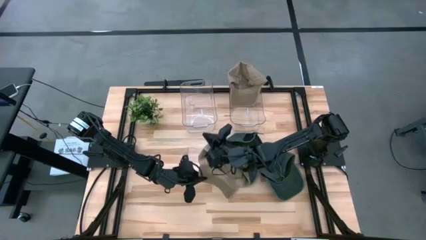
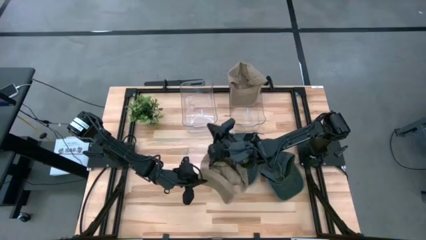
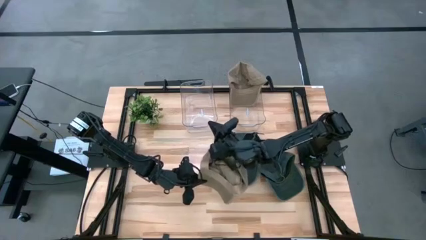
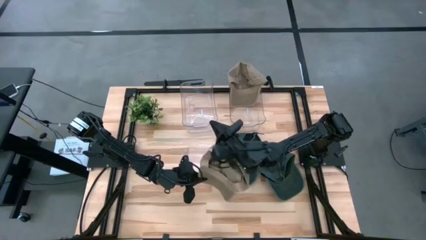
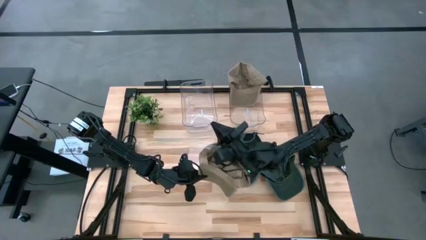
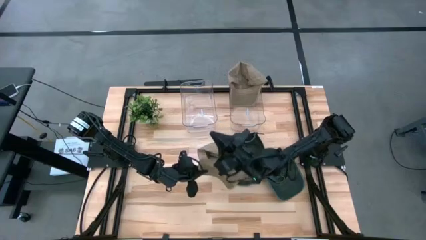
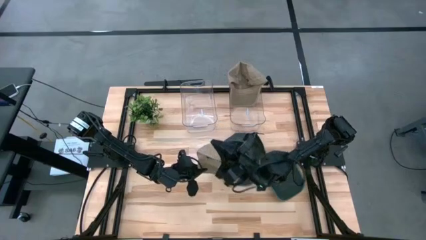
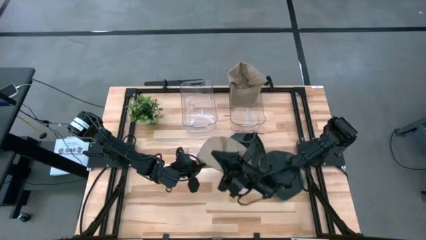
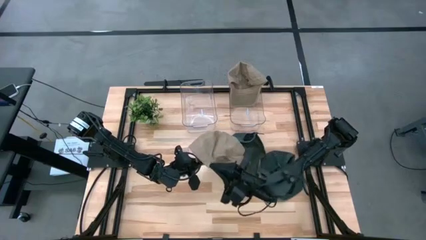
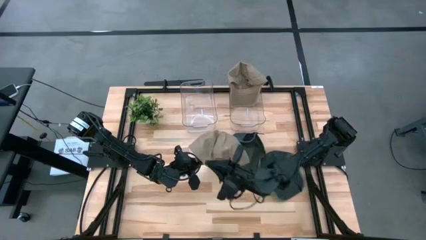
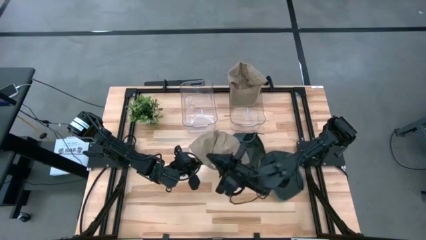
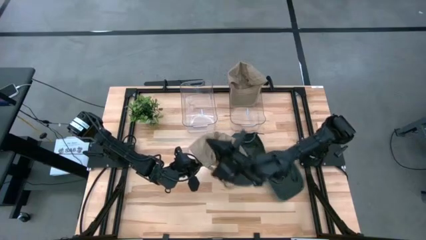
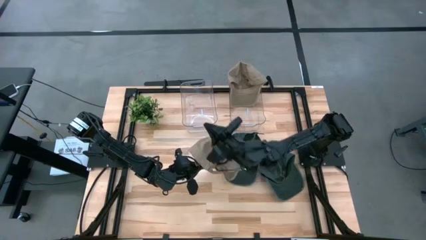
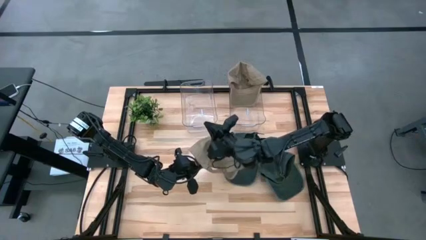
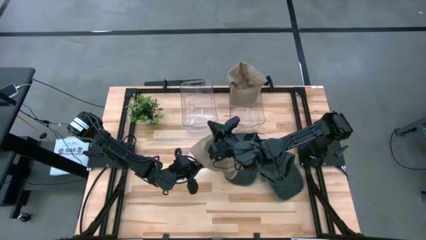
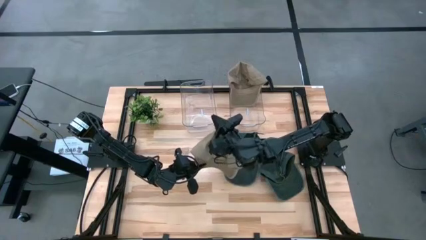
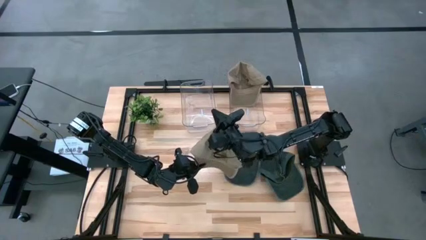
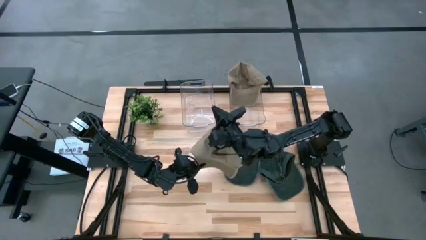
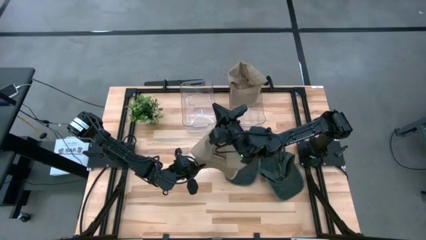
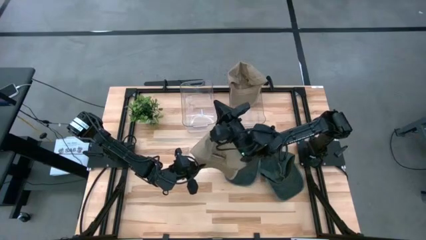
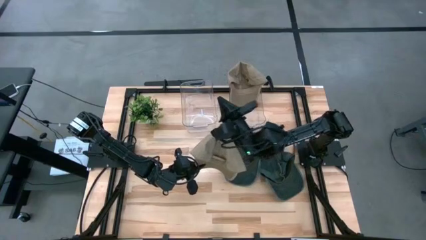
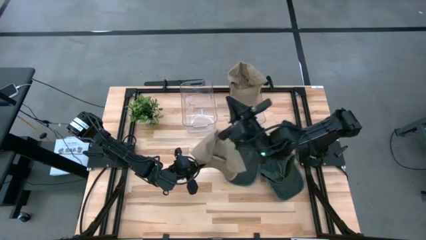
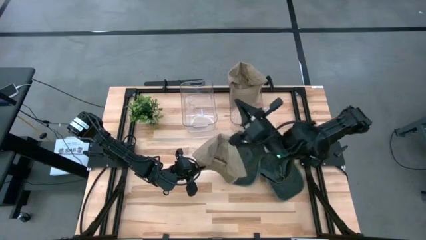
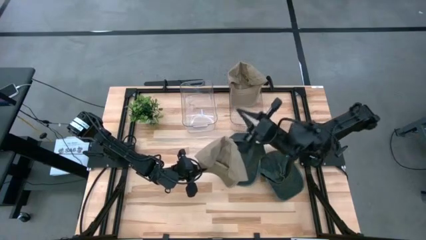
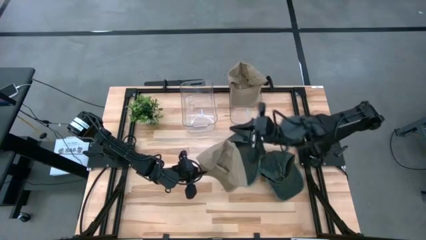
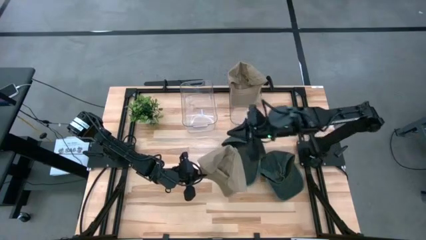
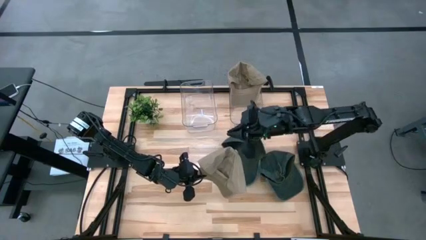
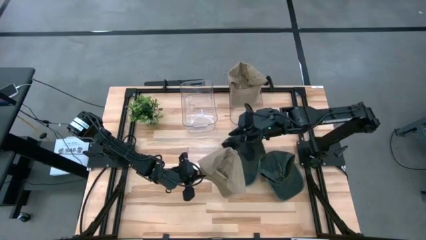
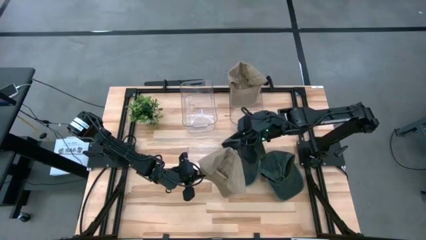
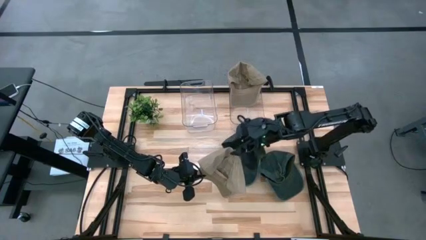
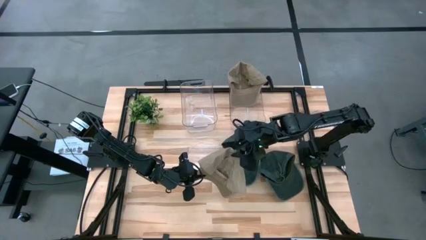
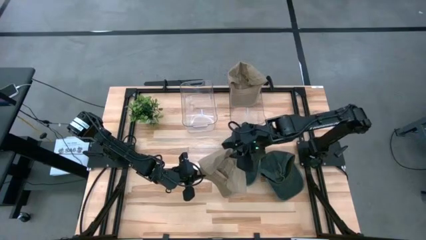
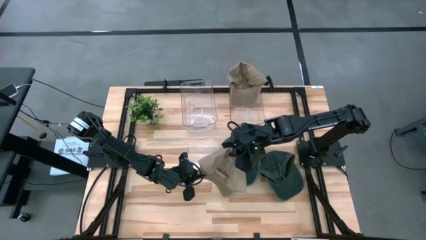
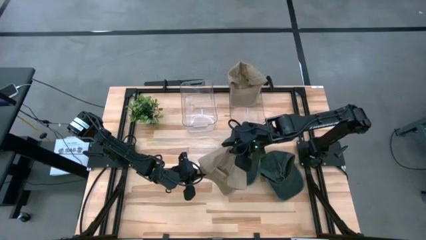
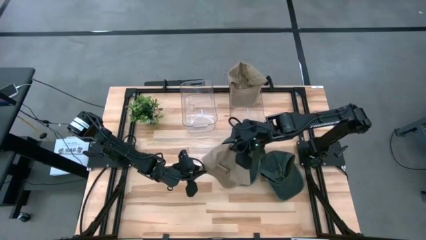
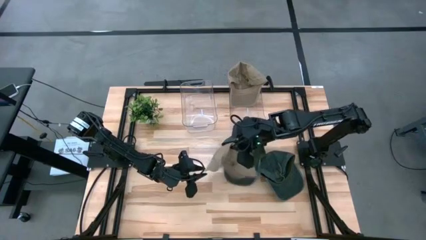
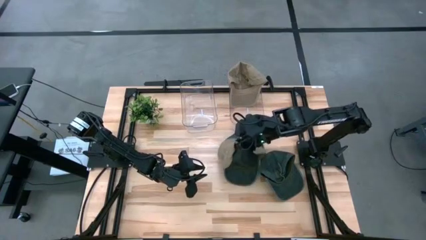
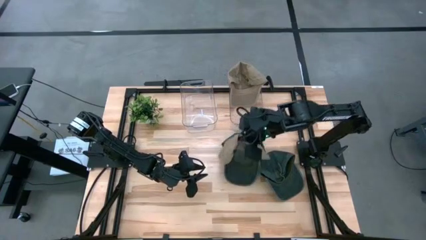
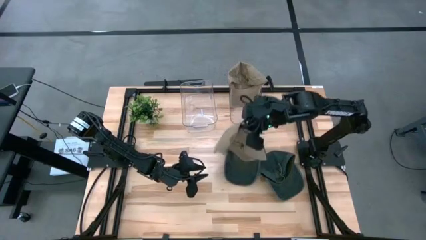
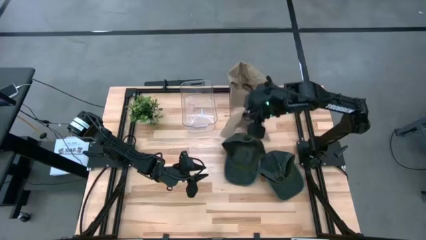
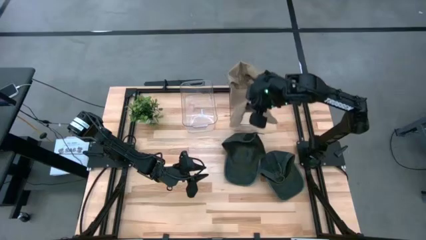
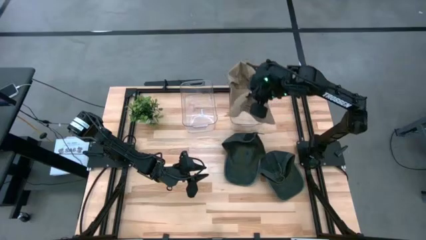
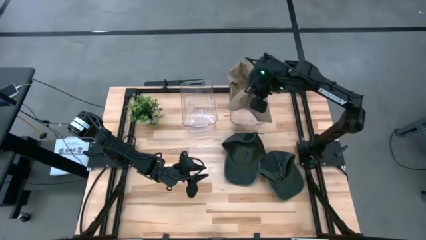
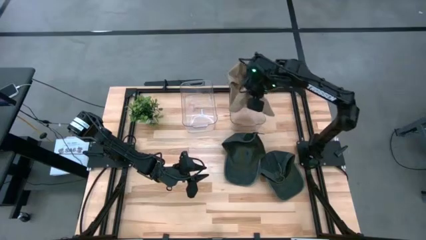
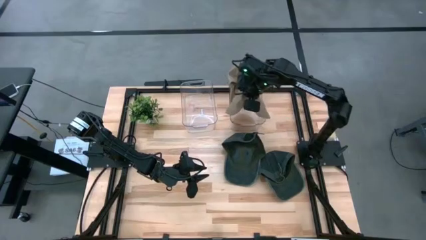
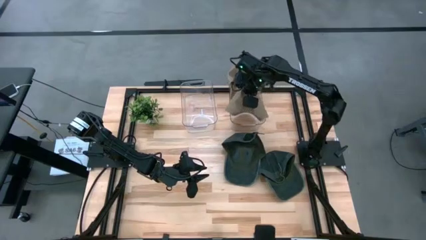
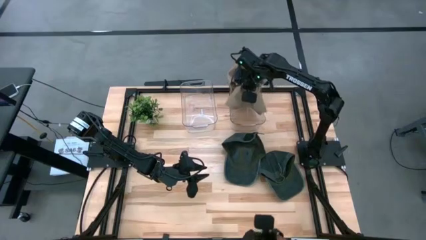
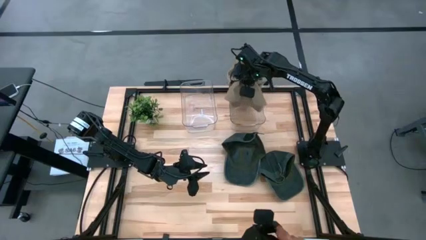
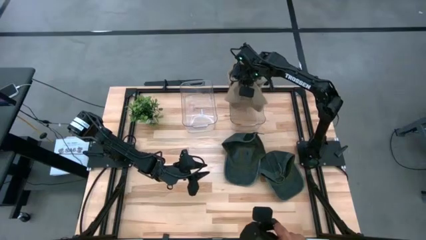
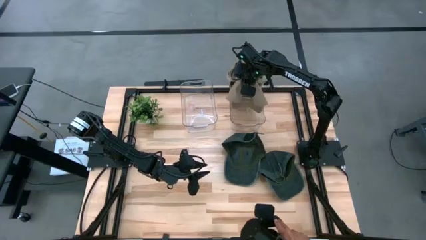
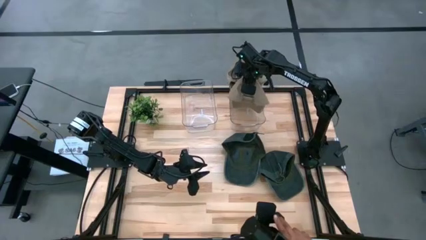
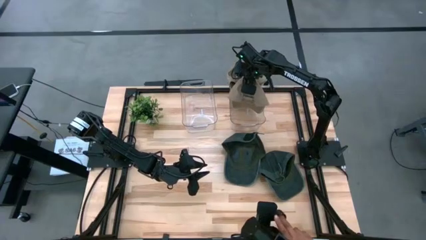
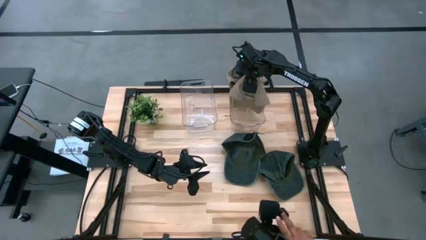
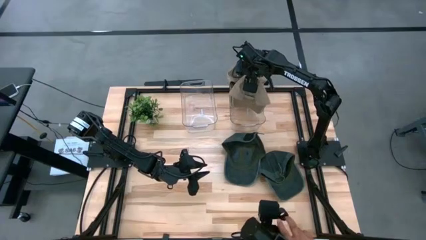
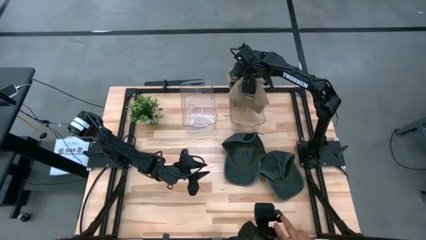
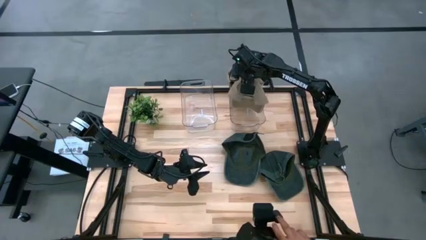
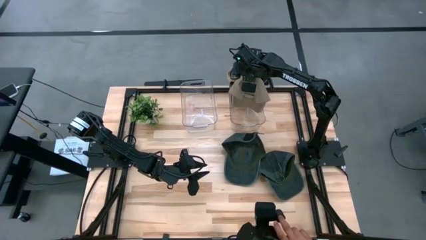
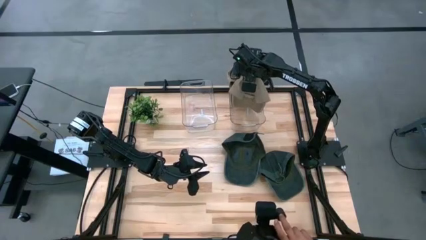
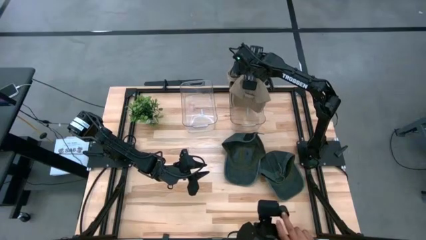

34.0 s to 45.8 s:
Task: Pick & Place hat
Put the brown cap into the right transparent bin
